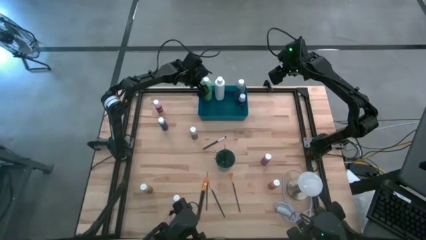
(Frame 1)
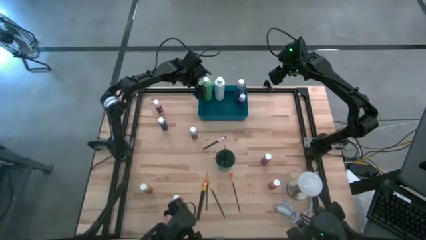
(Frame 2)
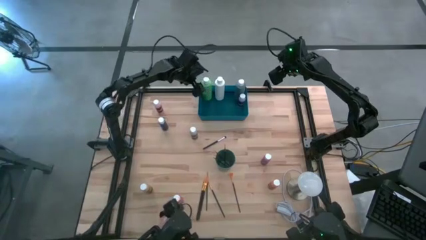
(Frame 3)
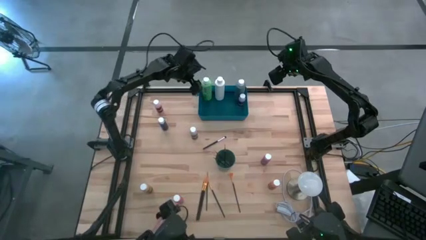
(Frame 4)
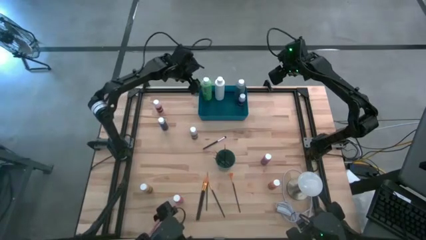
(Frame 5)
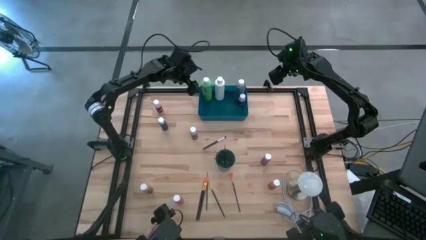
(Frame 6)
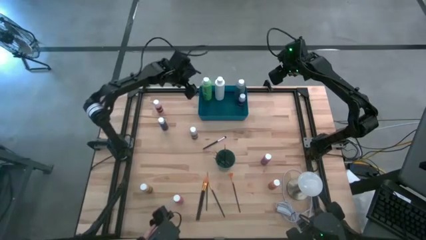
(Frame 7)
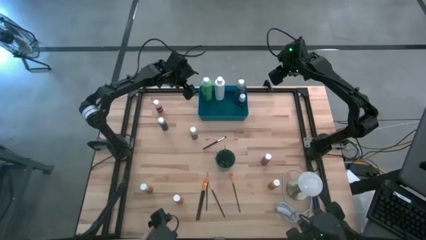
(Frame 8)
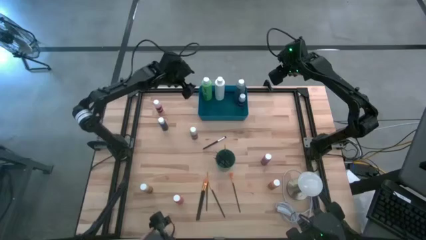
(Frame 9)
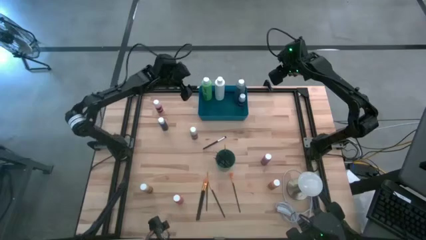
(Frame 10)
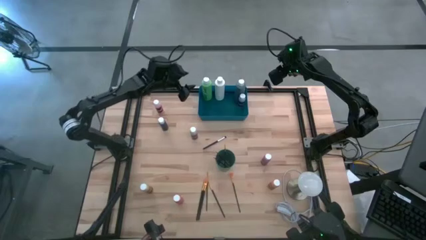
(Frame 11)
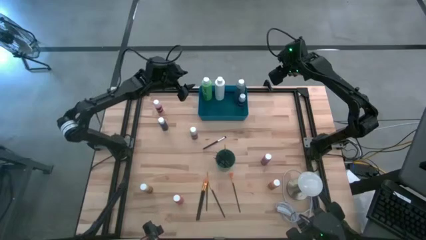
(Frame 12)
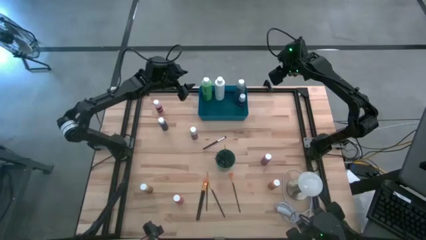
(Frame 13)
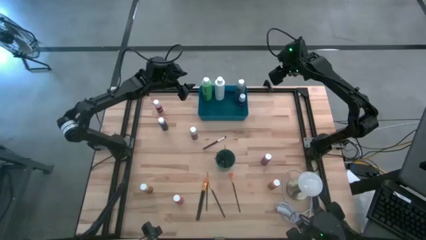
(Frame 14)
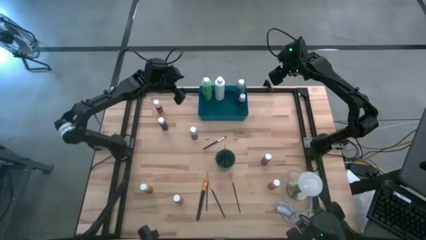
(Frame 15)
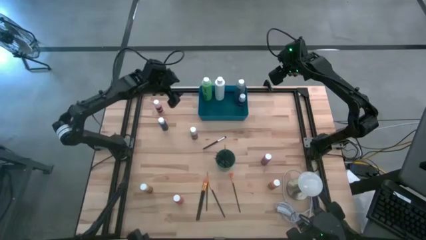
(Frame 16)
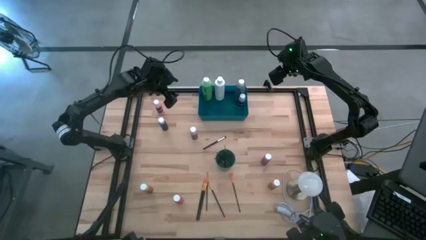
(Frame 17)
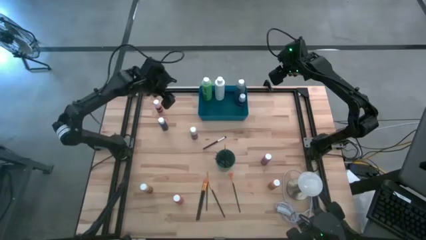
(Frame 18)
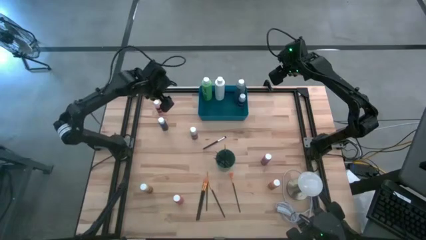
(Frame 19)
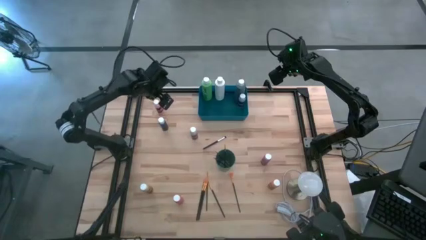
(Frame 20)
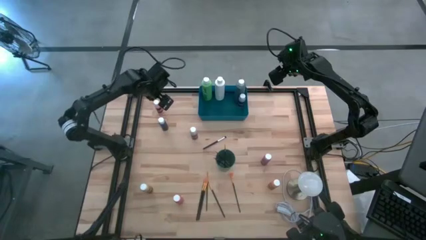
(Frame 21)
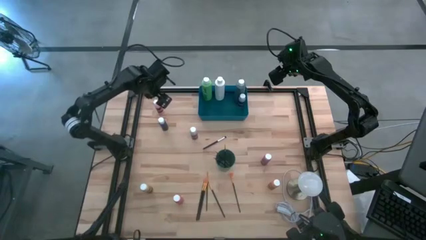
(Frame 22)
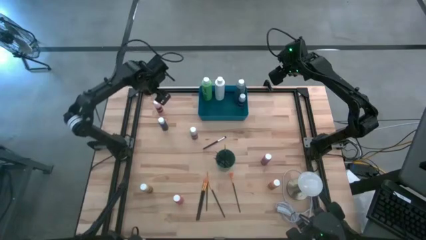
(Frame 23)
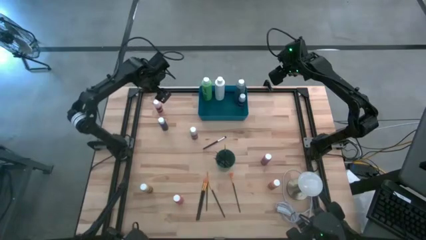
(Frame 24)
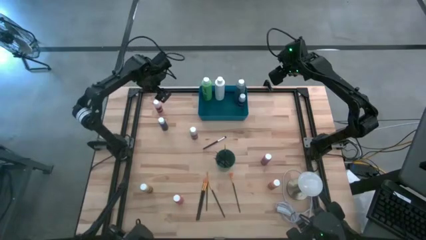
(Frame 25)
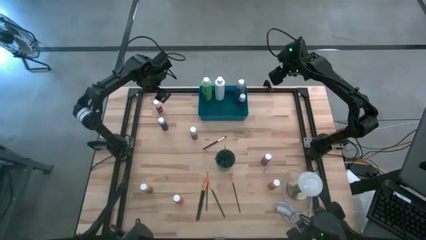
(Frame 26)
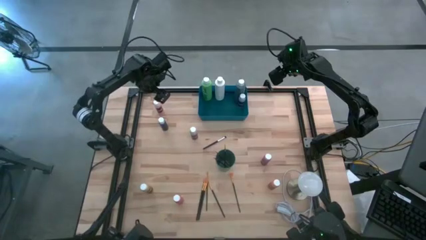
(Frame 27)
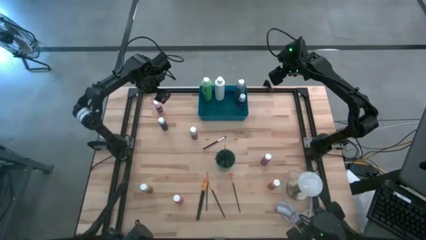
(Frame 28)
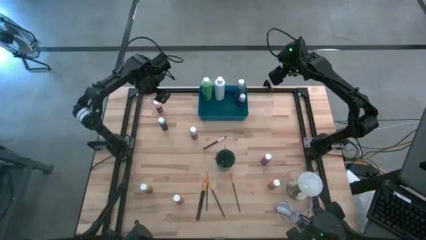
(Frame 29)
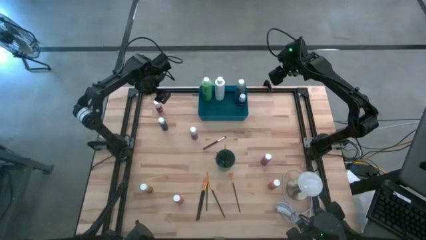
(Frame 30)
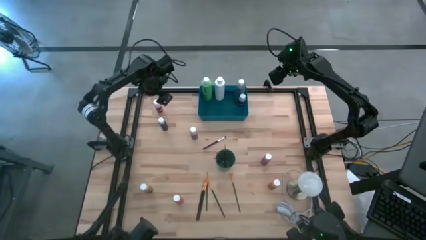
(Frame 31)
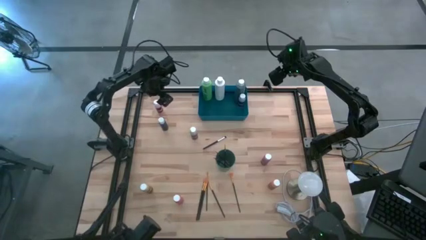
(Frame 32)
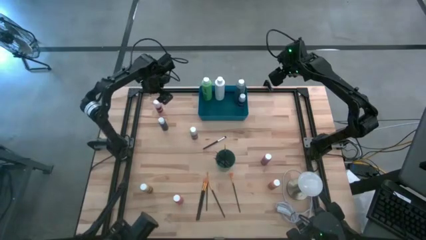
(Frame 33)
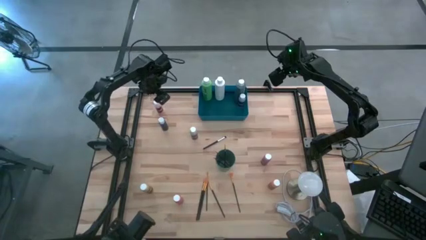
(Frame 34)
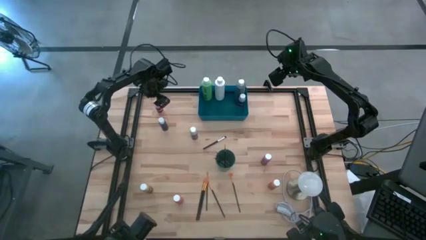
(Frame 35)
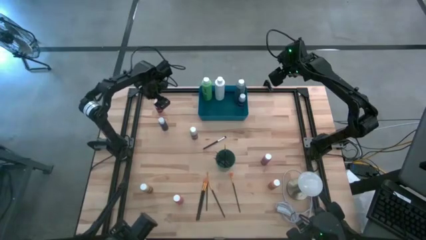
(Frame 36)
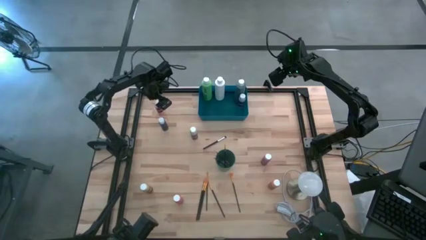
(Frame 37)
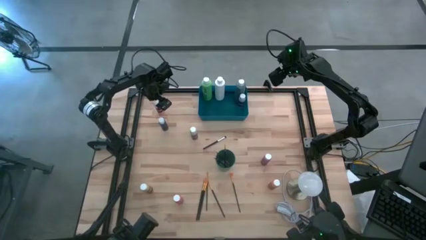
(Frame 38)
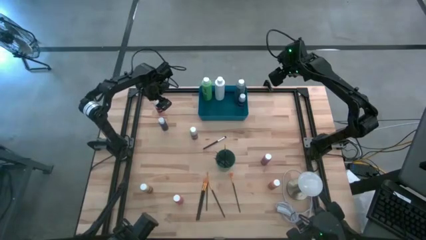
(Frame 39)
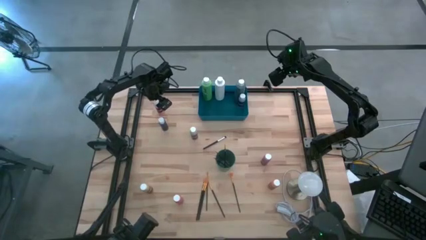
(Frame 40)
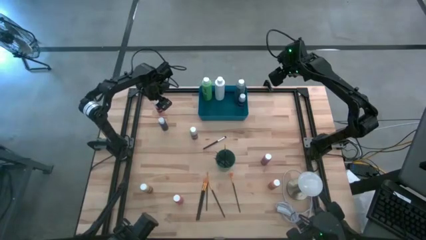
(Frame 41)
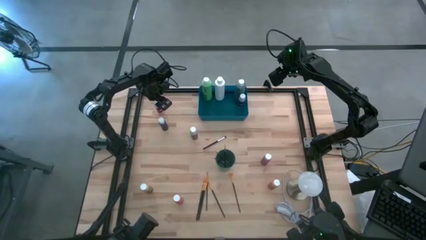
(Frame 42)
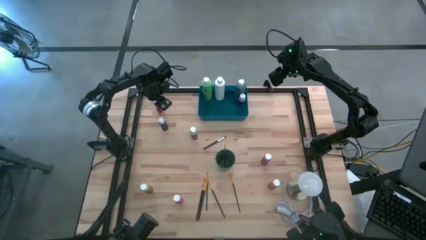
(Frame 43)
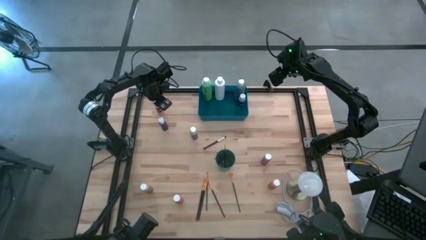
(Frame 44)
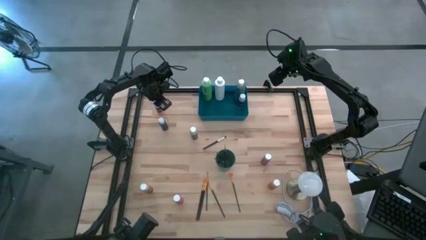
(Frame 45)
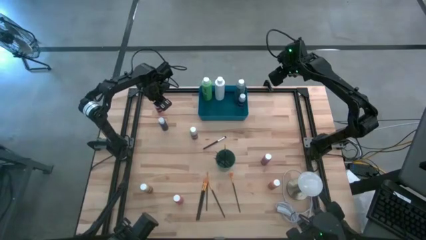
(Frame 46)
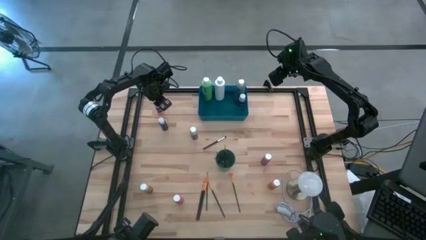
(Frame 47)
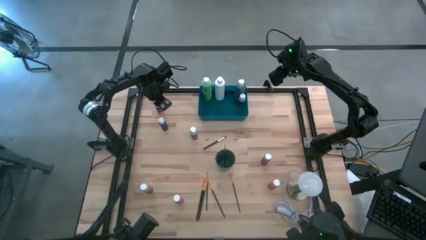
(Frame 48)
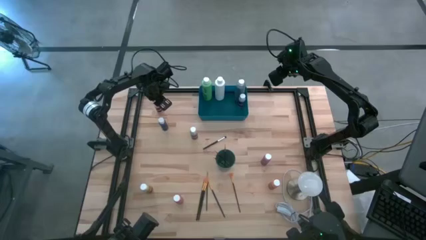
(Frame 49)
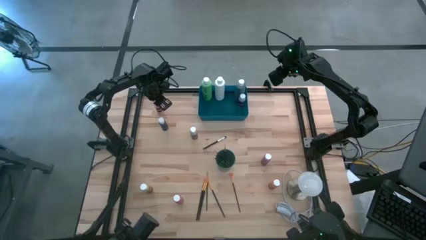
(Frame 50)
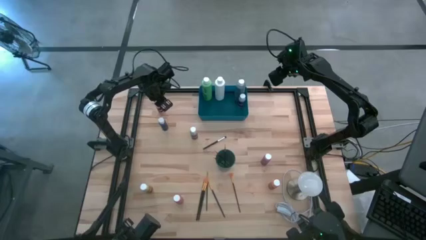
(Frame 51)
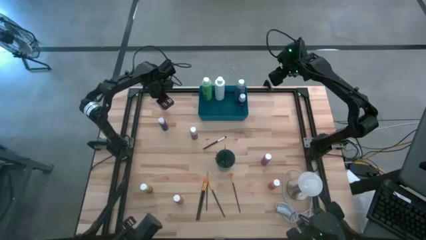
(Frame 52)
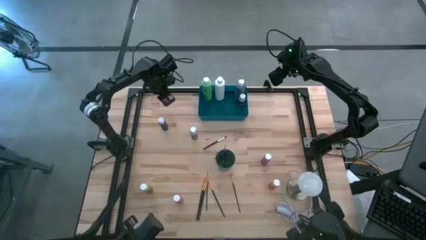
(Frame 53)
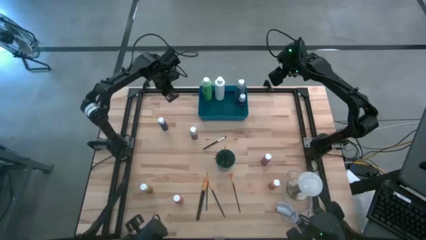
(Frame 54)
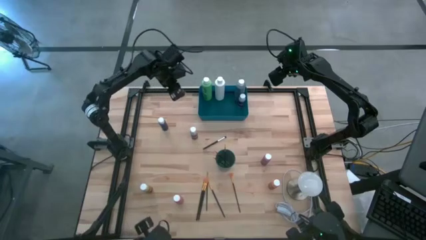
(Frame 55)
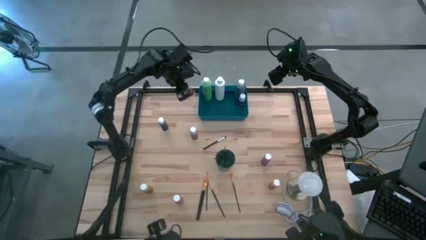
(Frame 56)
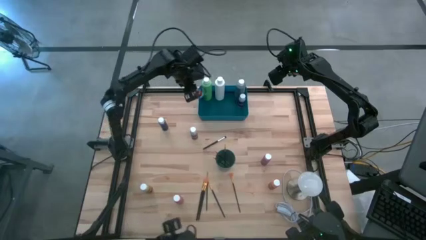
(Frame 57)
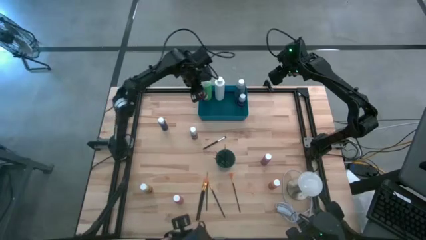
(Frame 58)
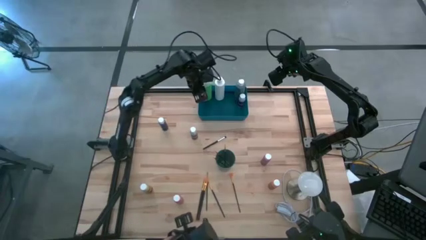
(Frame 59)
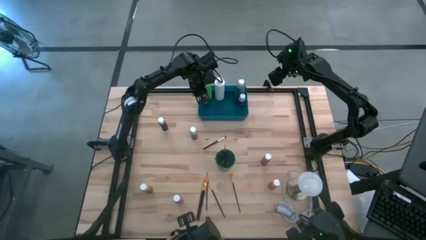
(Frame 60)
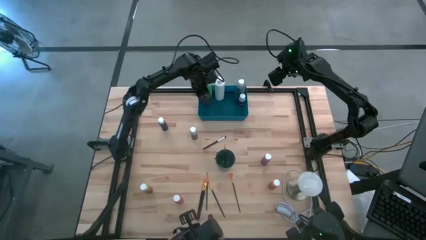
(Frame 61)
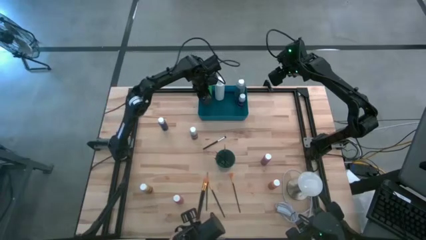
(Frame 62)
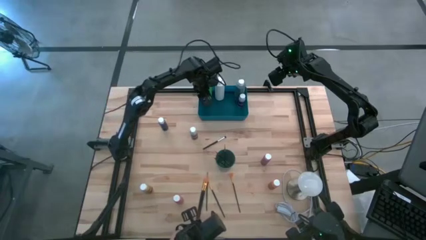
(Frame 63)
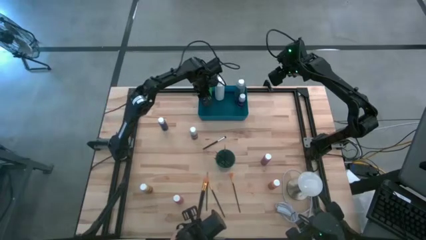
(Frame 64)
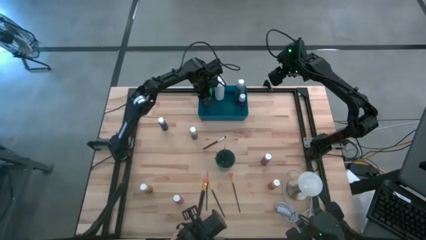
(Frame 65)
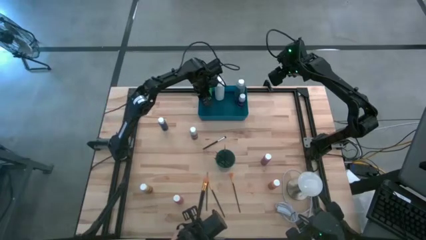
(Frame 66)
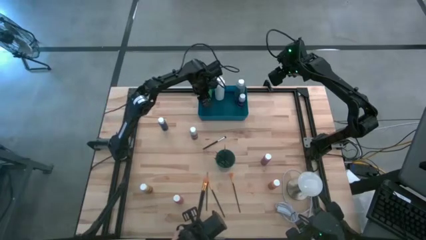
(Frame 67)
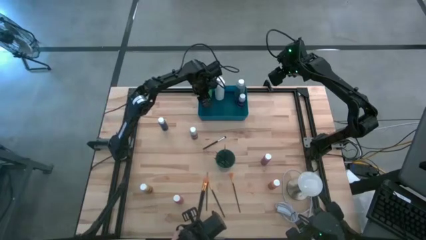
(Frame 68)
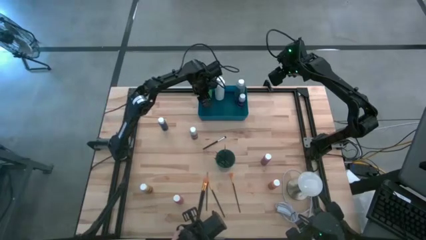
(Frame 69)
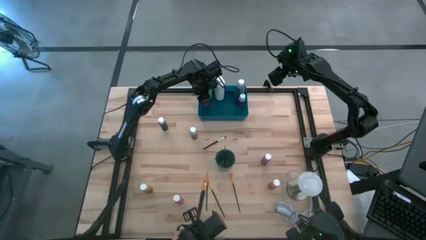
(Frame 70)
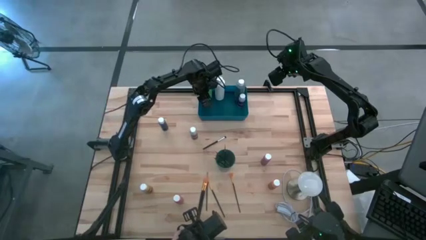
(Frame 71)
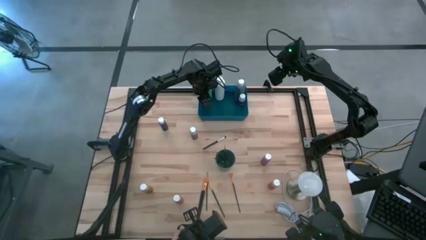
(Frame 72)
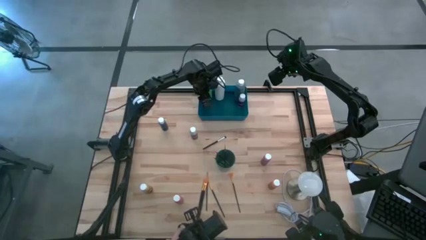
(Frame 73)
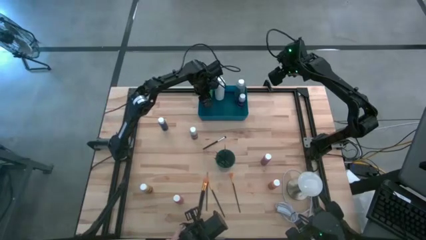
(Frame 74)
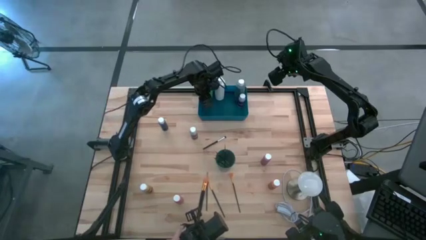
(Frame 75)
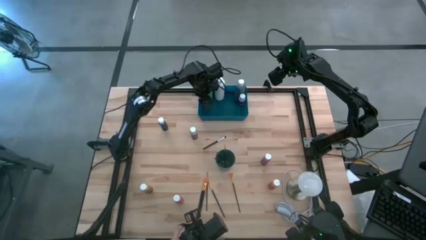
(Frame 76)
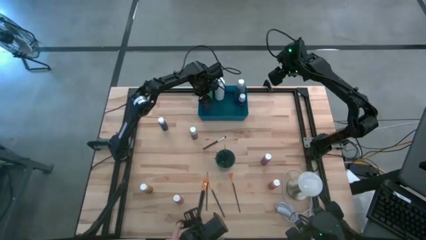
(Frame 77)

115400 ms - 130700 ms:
Task: Pick & Place Paint Supplies
Put the pink paint bottle into the blue bin
